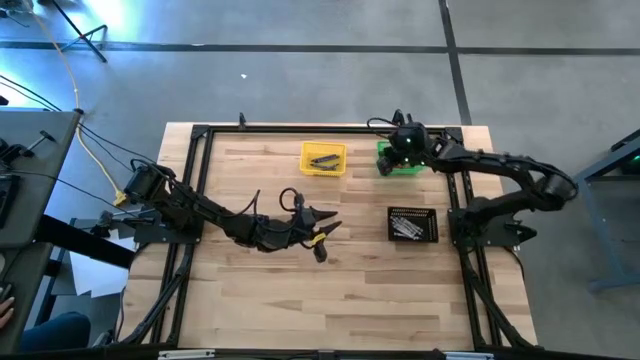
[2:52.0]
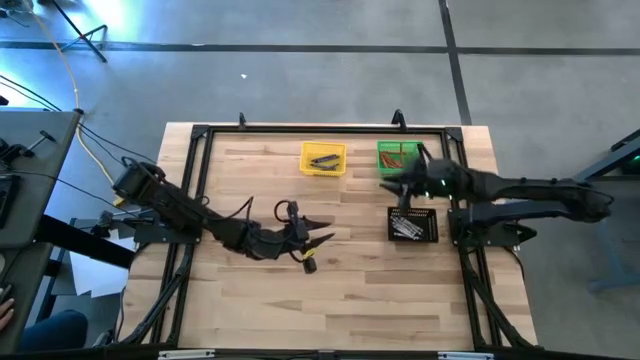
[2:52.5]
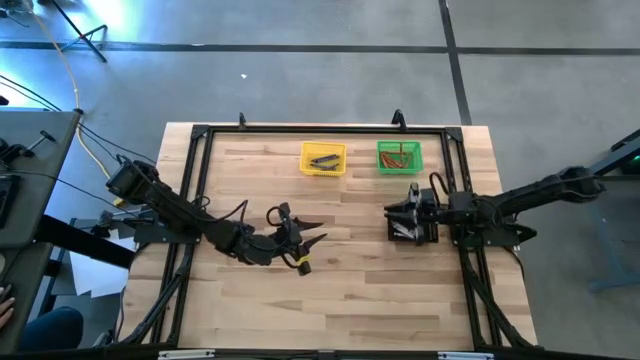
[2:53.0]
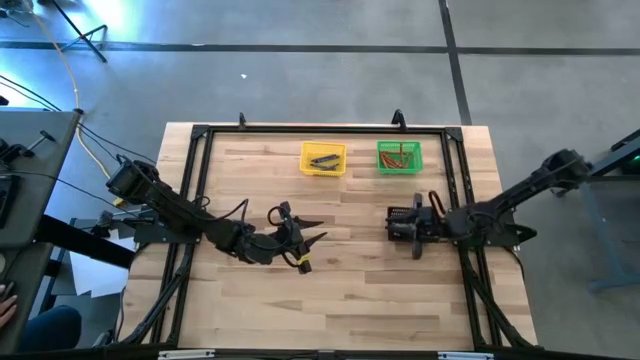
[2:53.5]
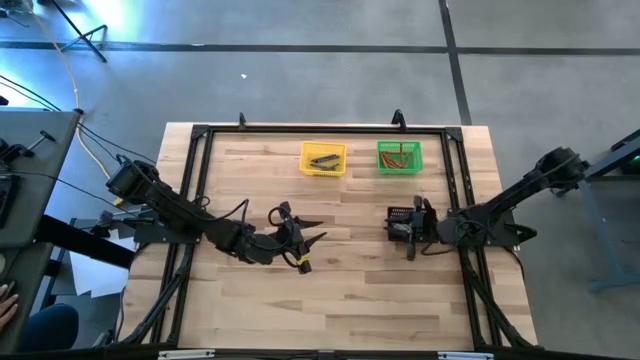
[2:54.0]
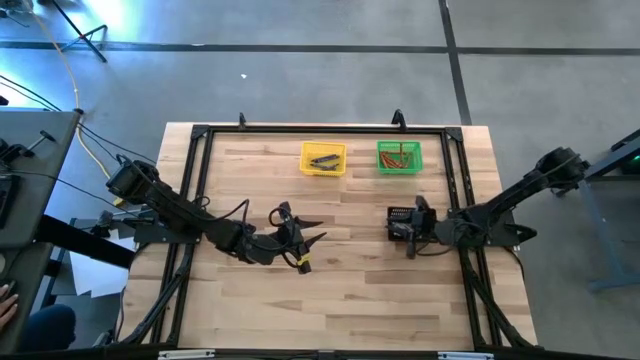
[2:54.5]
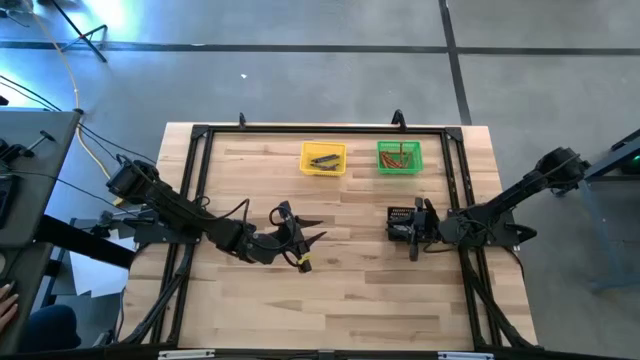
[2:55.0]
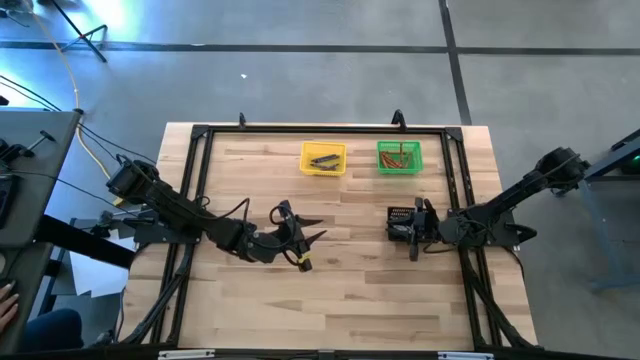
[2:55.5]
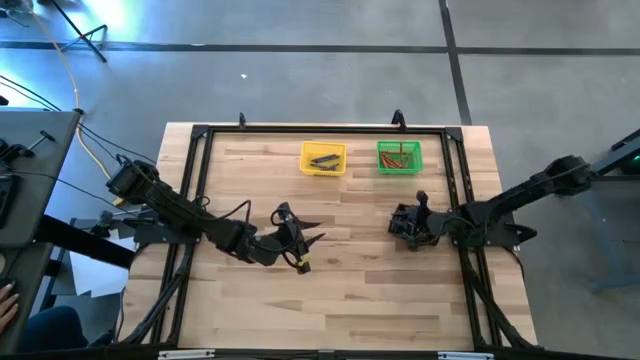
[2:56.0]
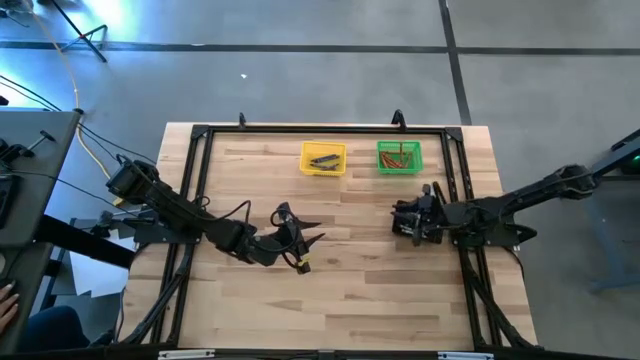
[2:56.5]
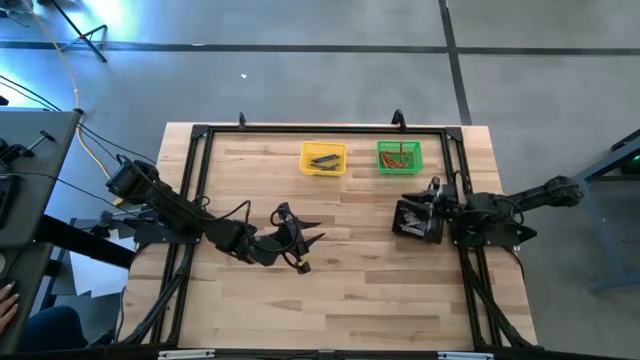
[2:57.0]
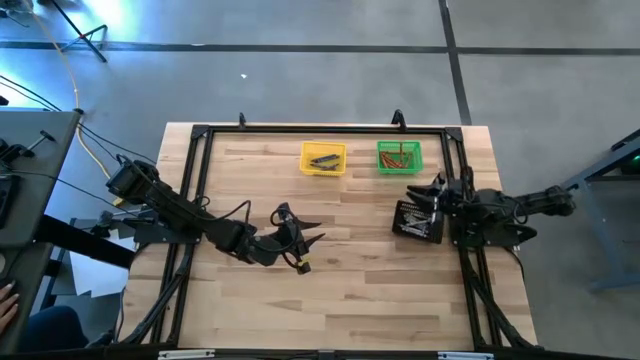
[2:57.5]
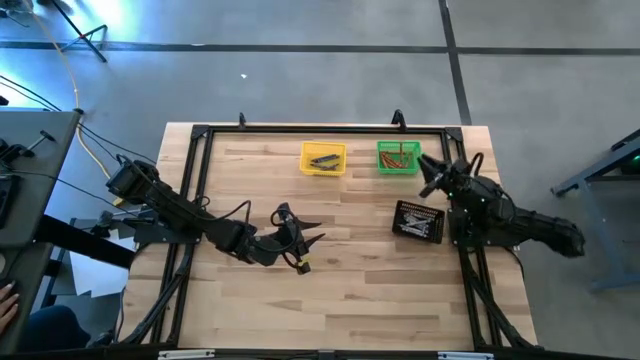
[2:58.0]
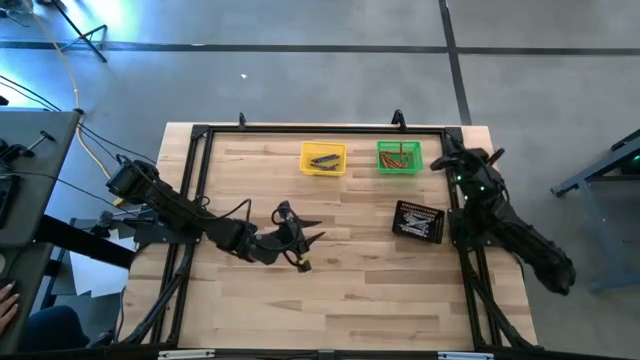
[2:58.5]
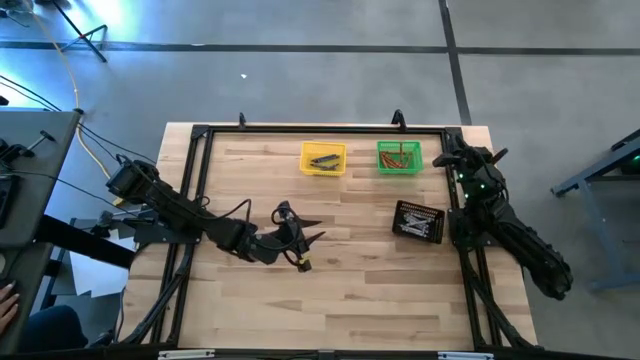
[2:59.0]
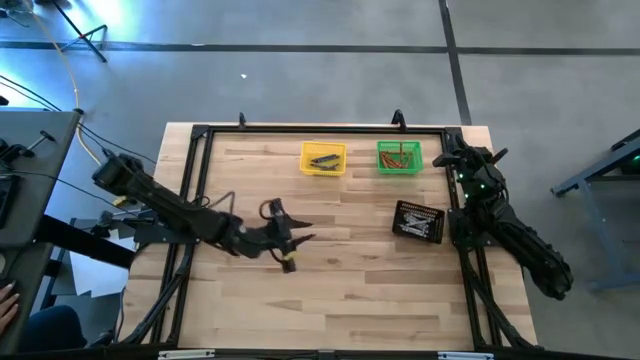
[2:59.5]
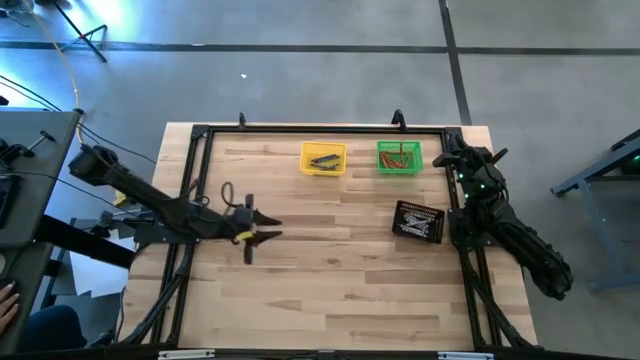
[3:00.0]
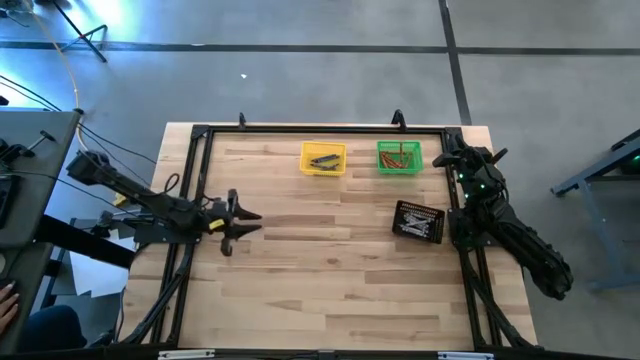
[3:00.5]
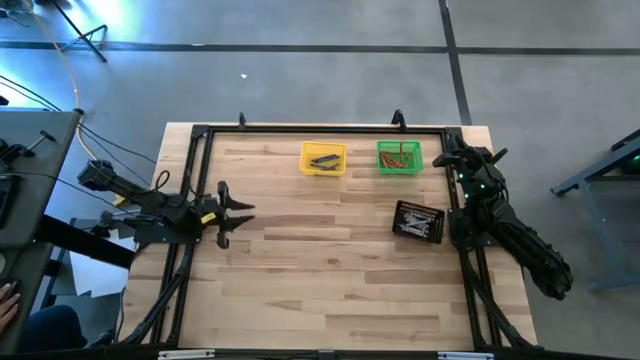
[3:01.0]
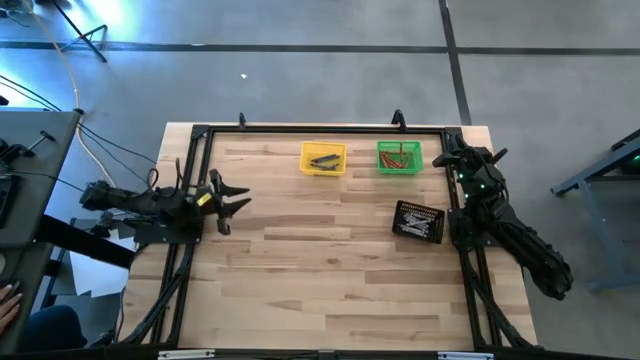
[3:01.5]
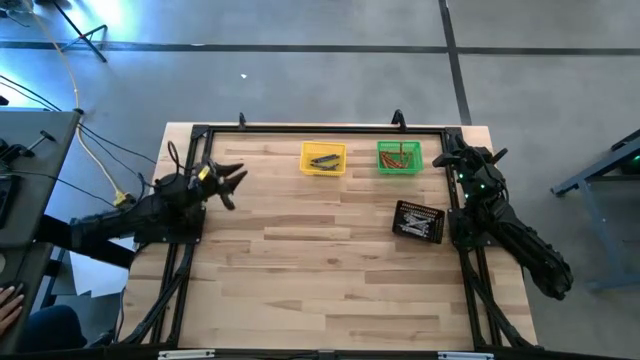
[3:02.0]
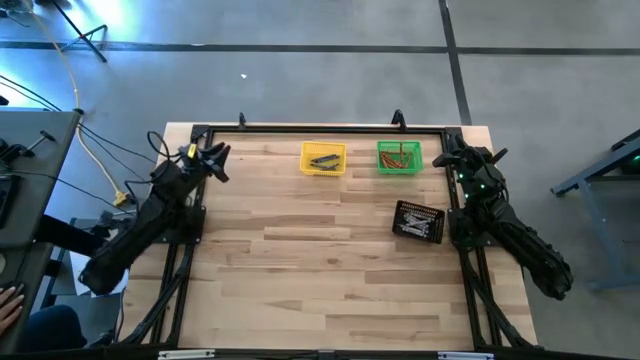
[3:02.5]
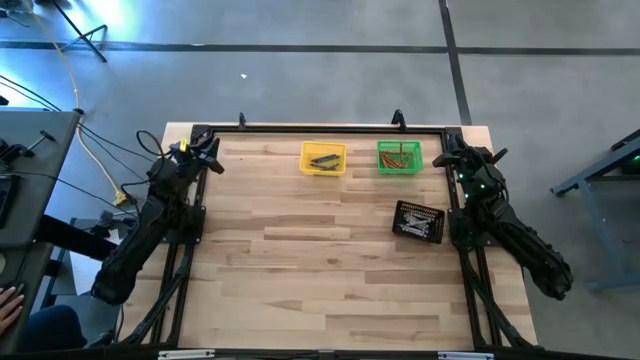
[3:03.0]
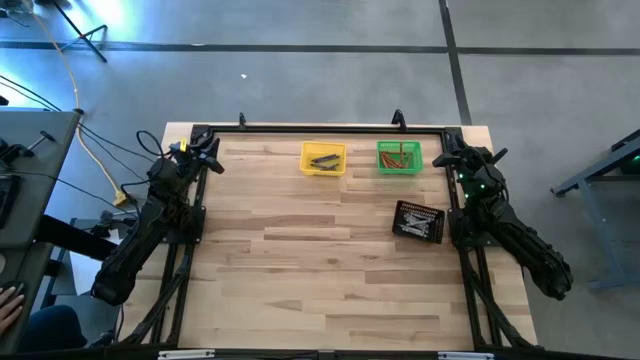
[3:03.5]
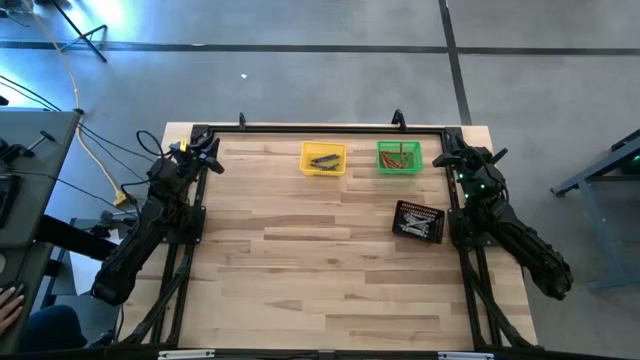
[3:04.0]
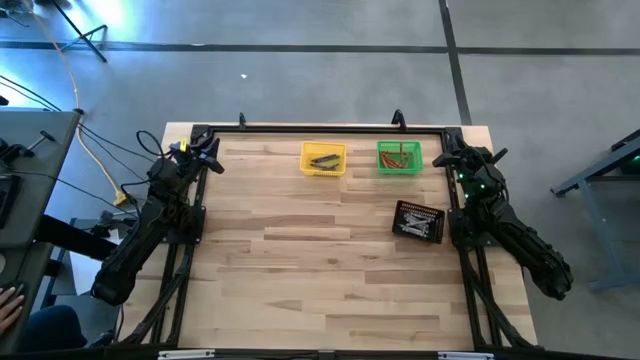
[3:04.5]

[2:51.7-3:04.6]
Task: Sort crayons
Return to Home Position

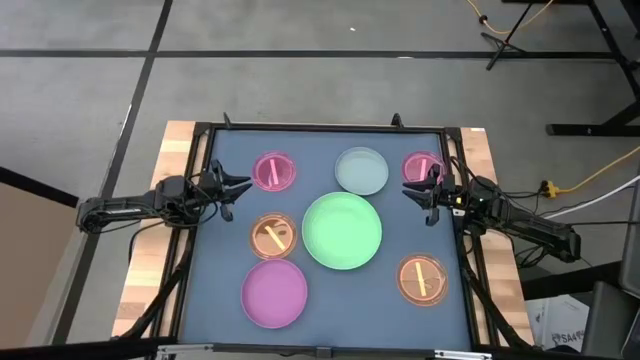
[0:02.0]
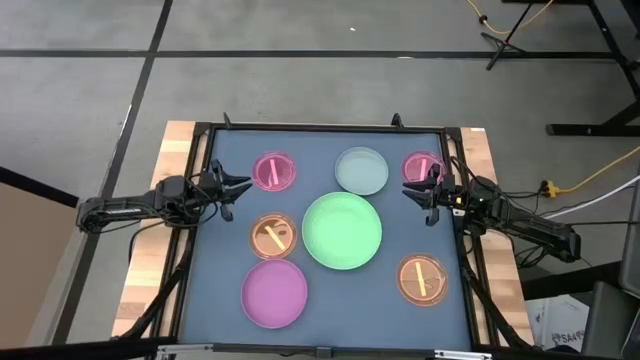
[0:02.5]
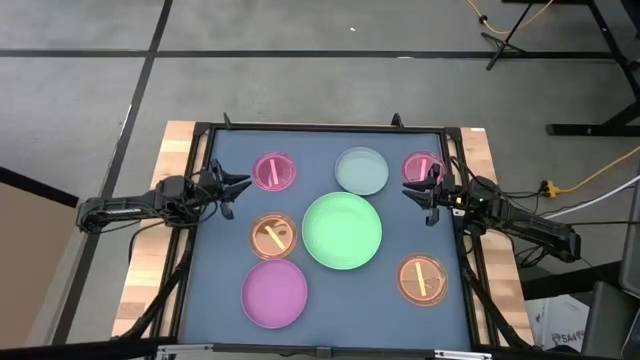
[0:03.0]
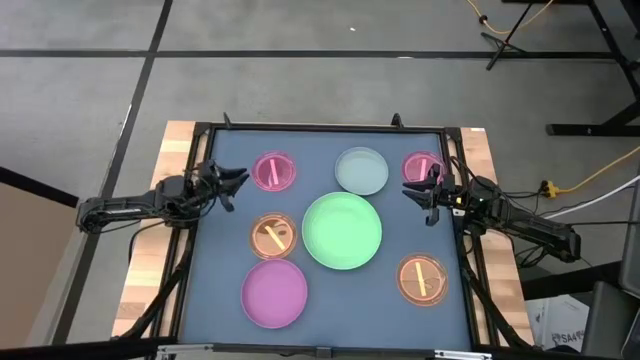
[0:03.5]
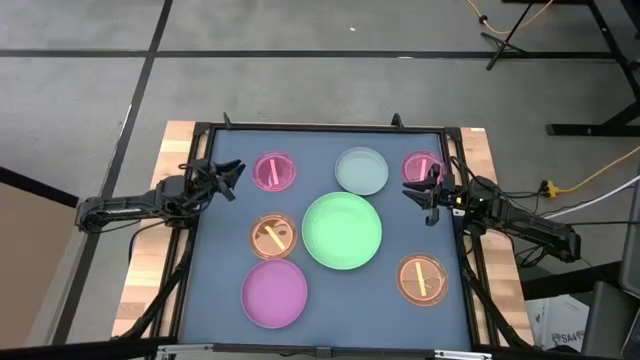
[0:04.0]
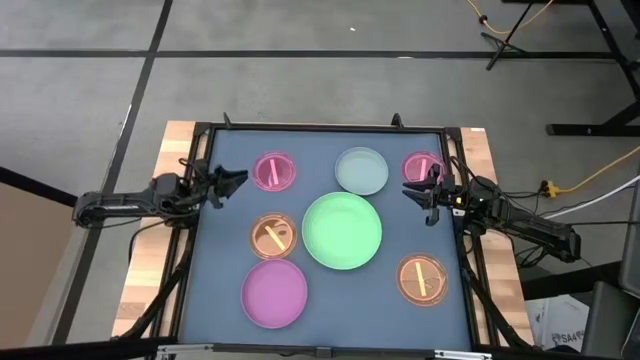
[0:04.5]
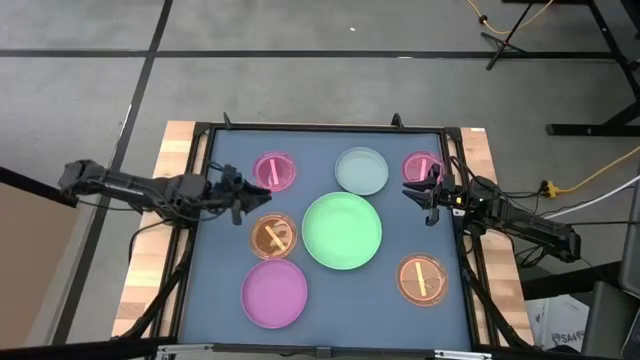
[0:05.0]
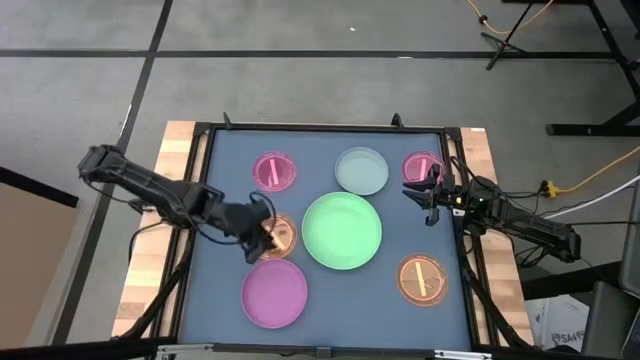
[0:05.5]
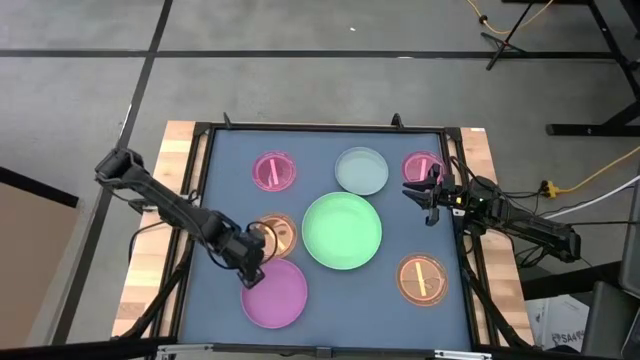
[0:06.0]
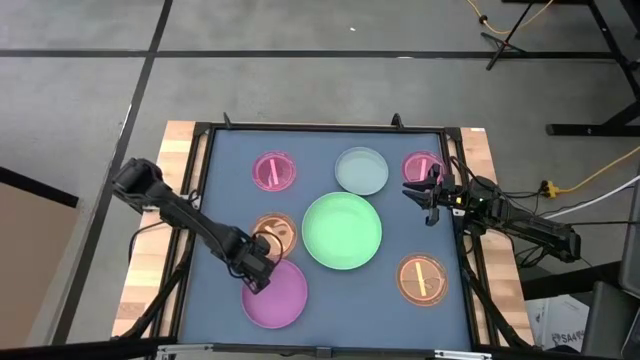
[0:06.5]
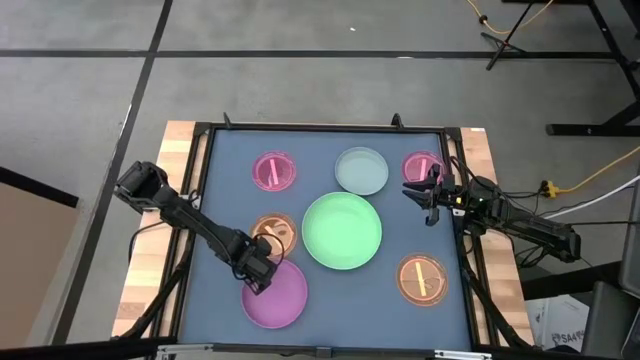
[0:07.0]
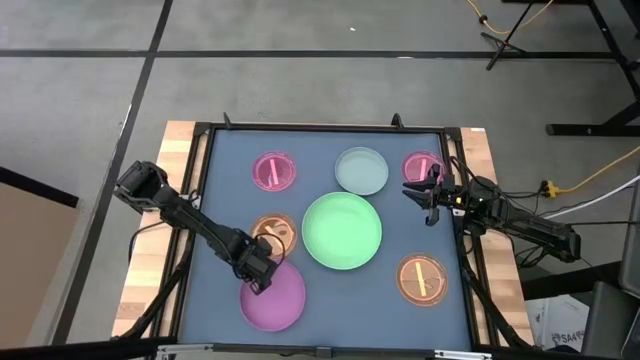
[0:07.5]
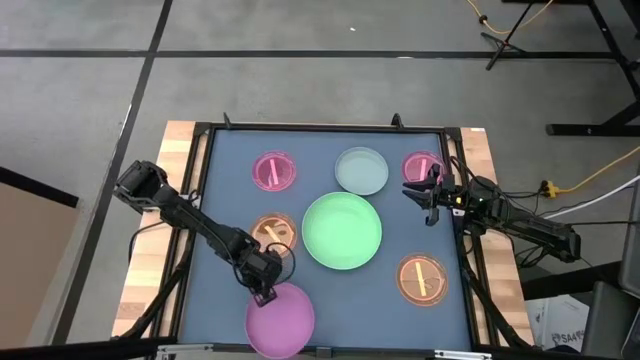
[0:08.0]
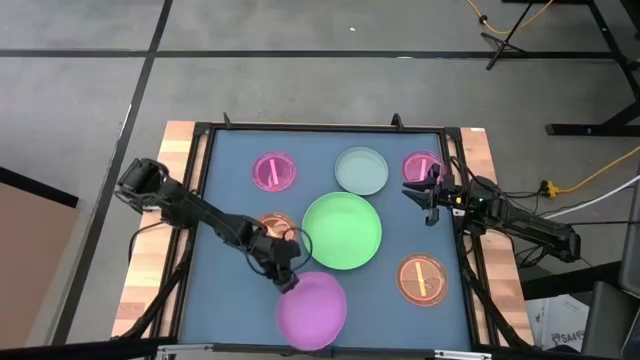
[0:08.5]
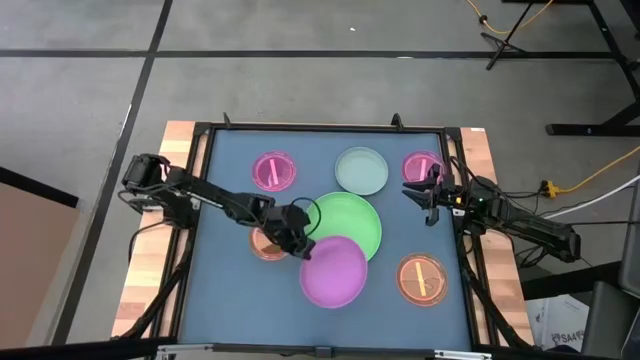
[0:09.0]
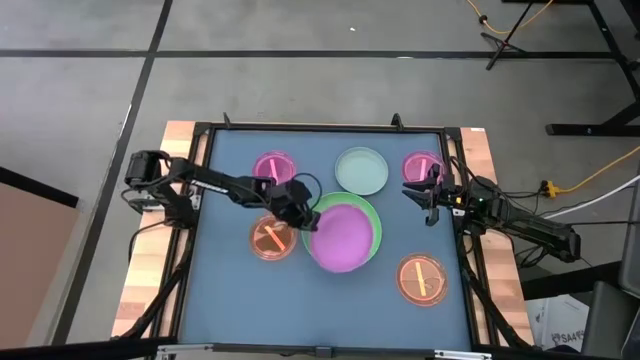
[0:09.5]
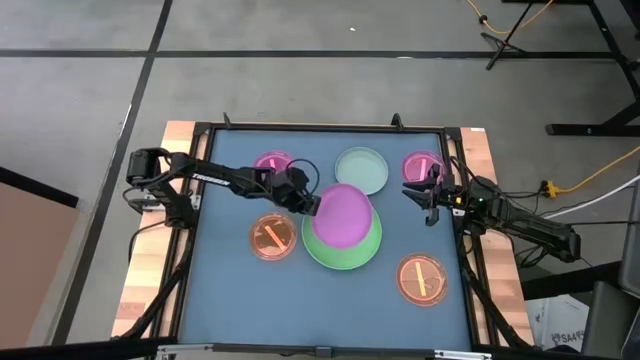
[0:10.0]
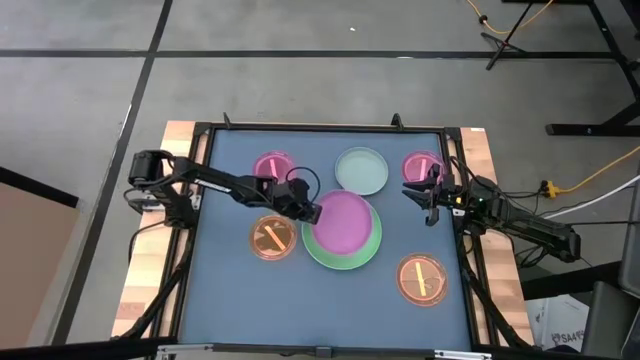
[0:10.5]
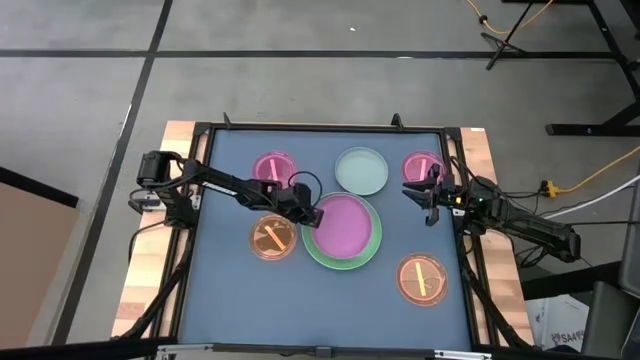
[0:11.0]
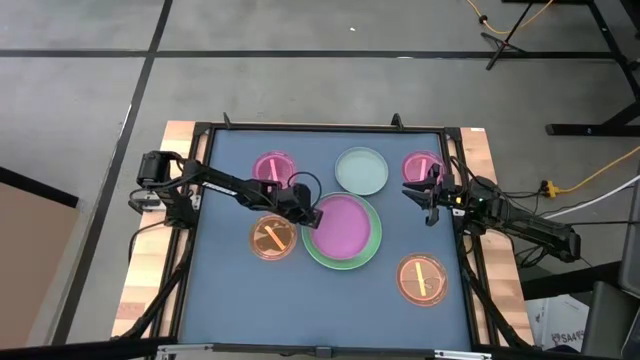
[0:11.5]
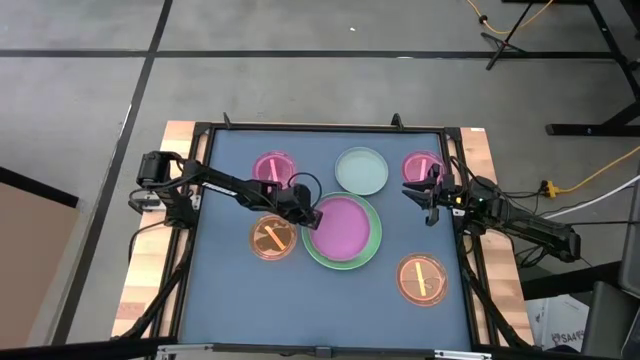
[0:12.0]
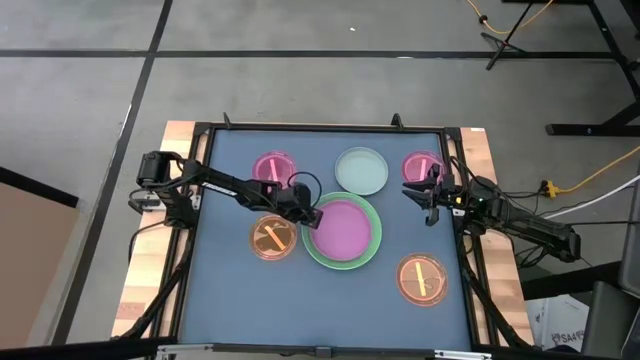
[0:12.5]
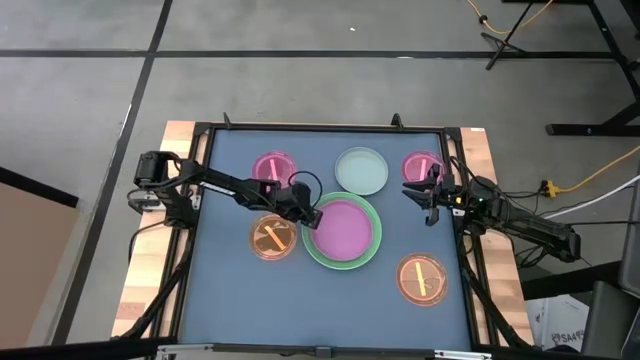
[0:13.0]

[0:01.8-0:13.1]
Task: Stack plastic plates
Stack the pink plate on top of the green plate
